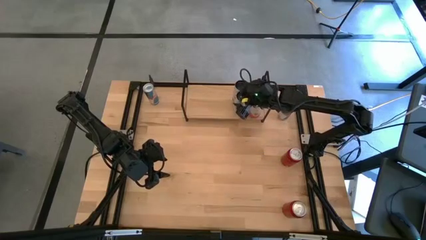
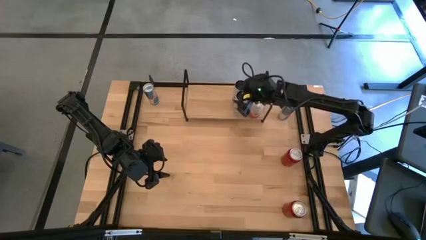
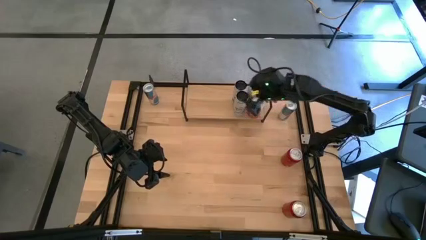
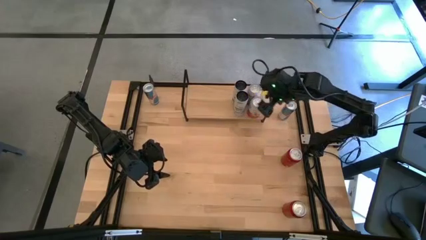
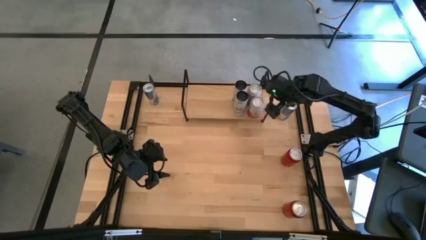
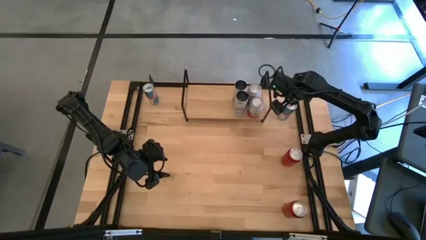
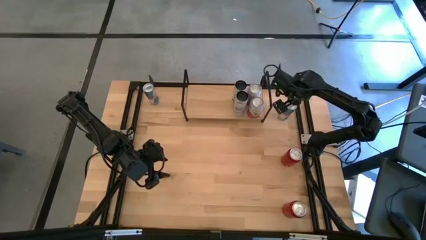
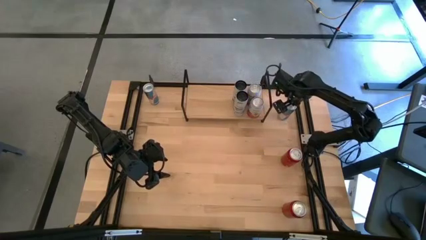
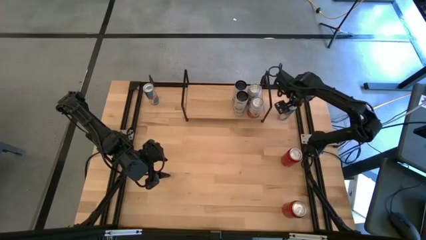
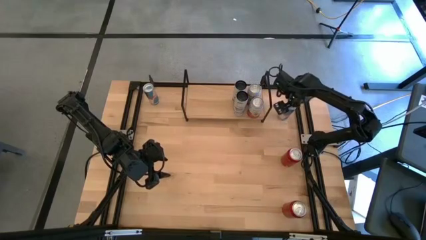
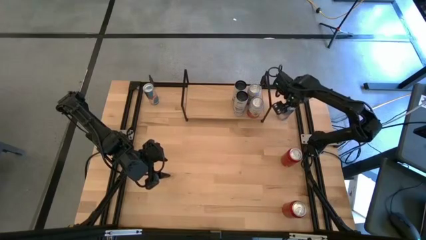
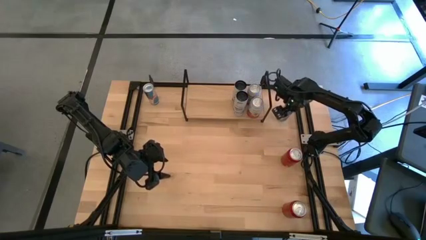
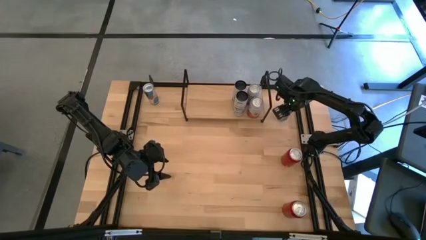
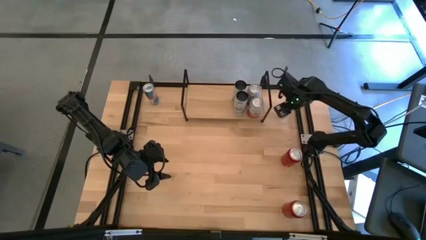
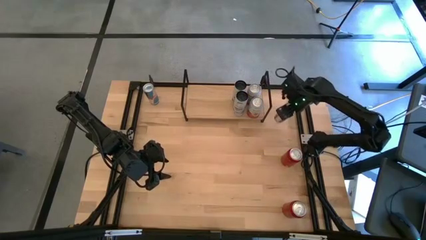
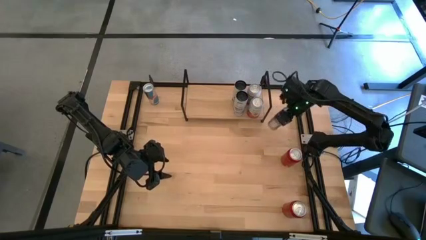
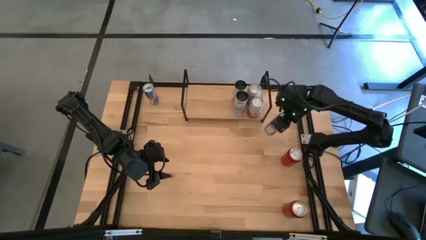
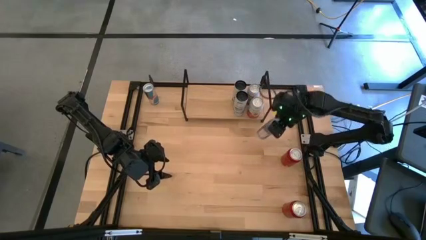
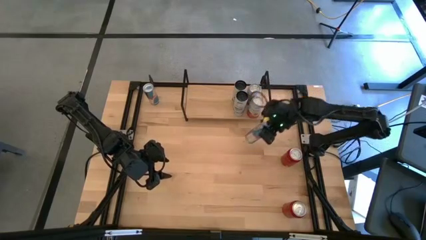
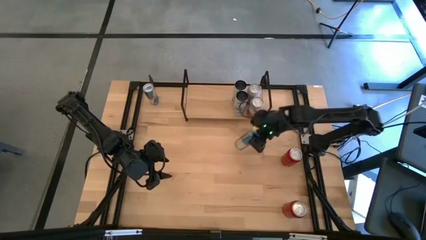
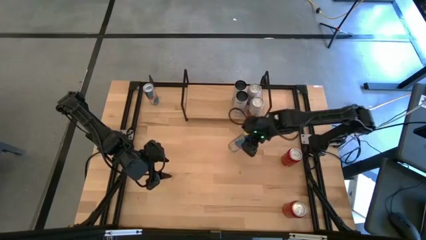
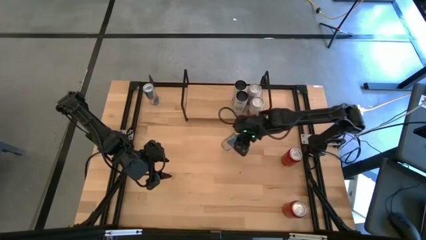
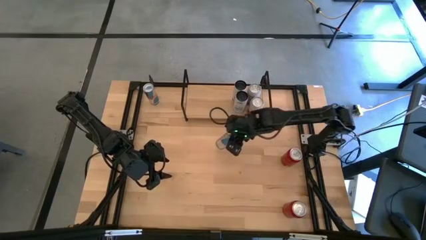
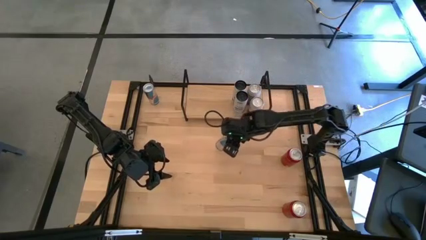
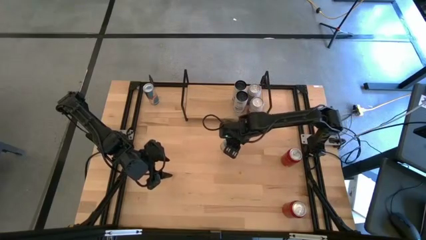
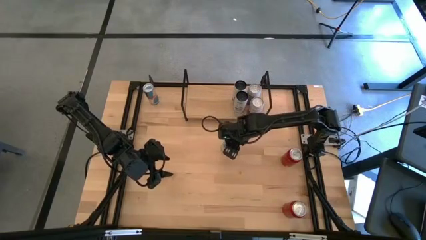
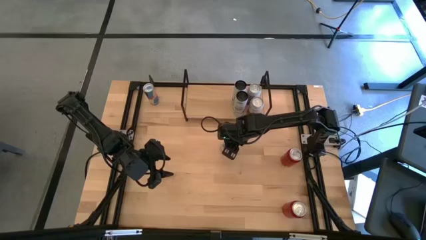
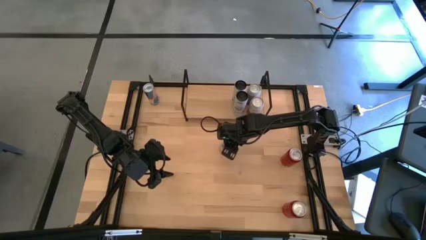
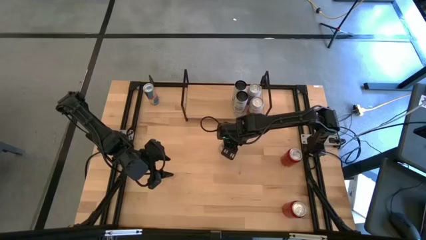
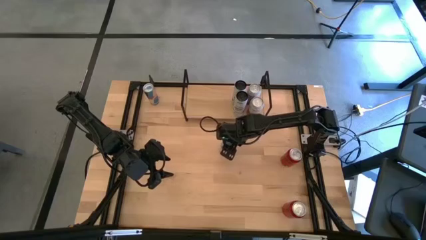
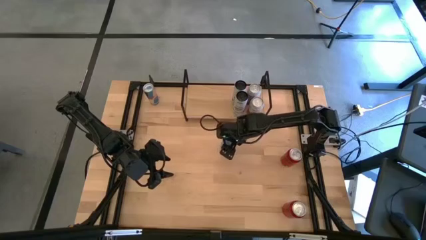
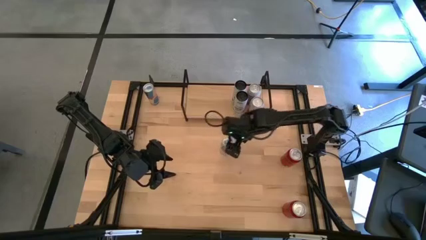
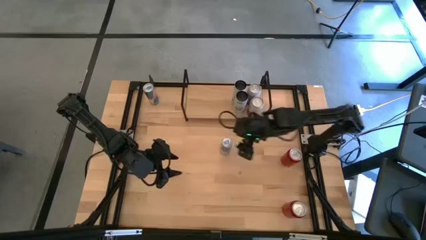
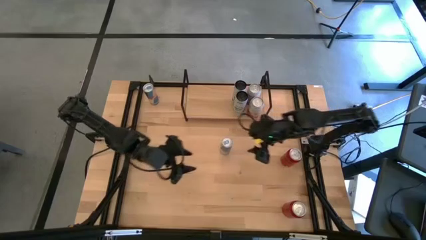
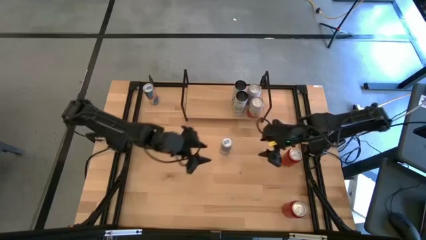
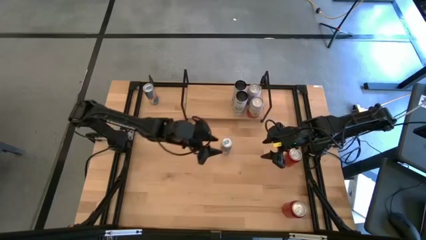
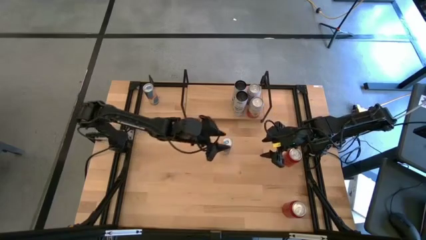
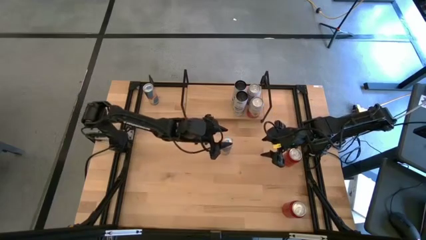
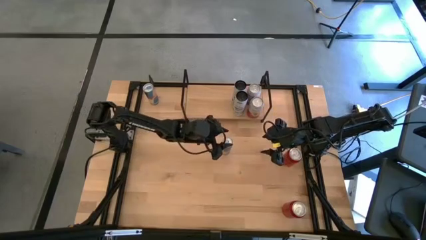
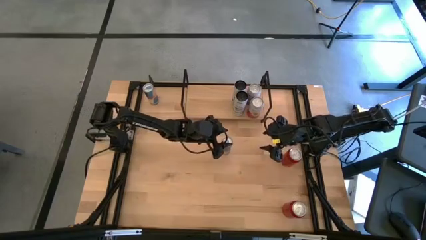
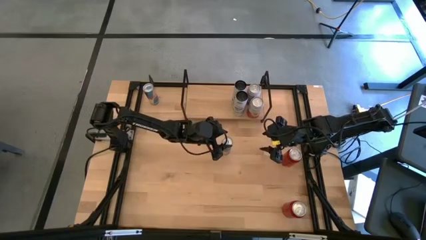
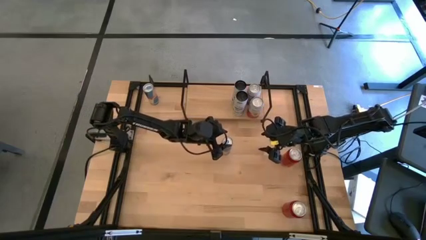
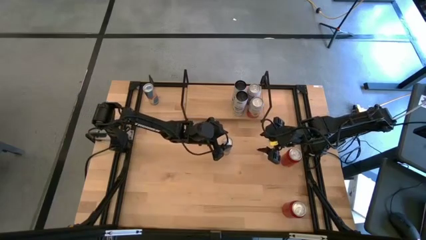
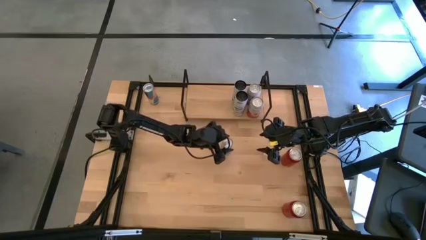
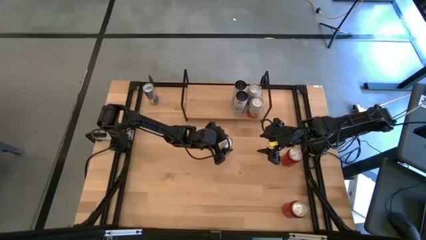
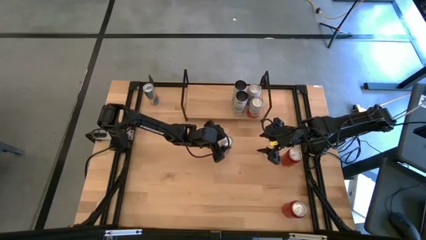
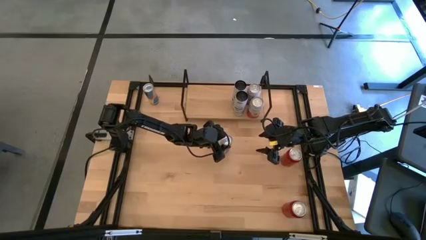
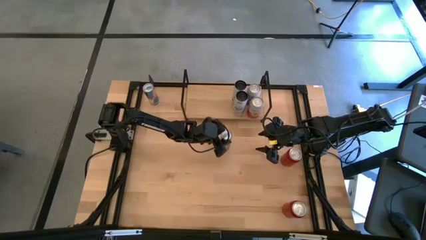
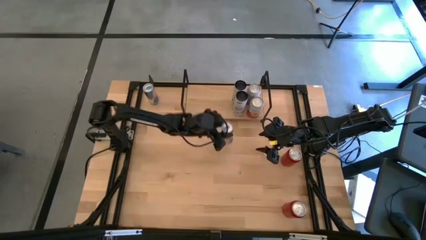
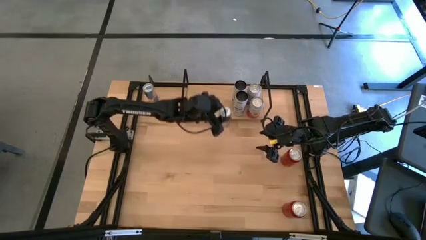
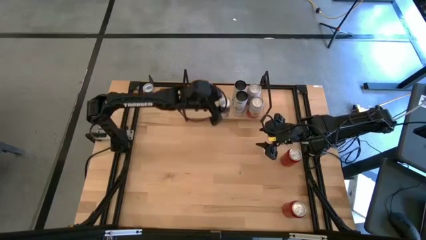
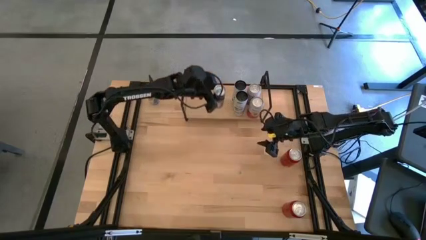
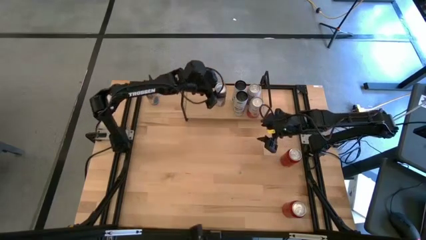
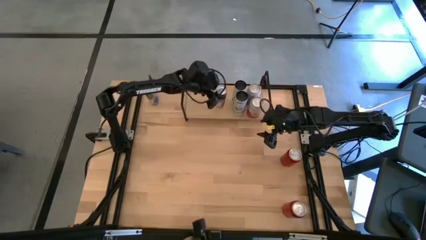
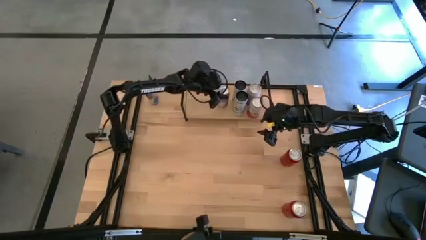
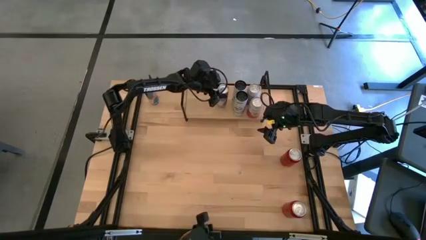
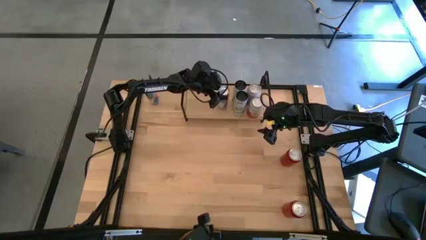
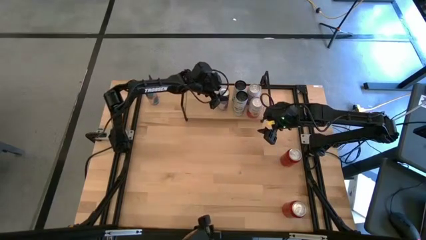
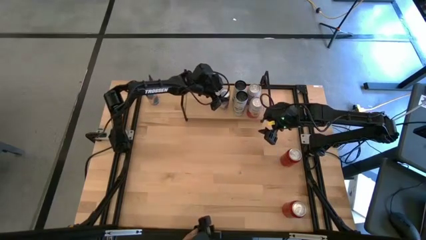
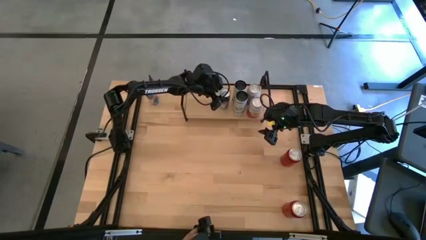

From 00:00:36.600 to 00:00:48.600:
Task: Place canned beverage on shelf
Put the right blue soda can on the shelf

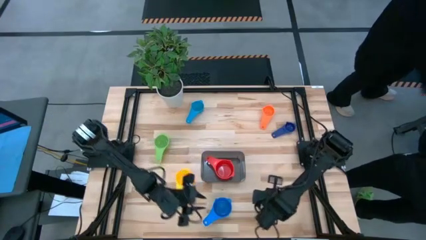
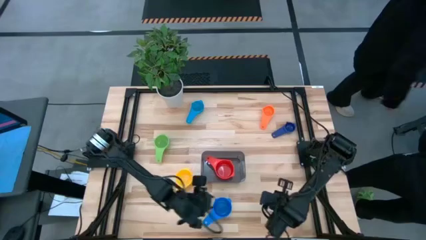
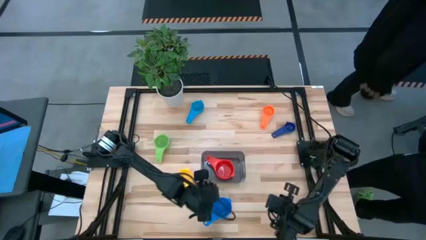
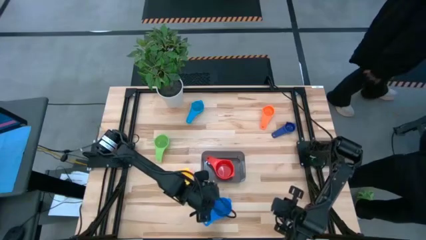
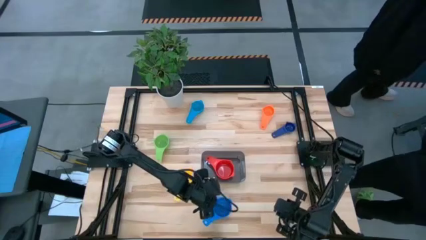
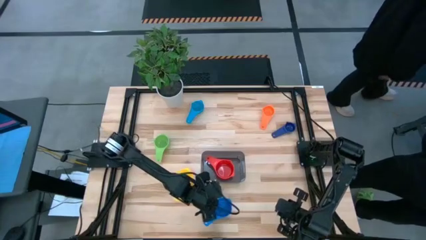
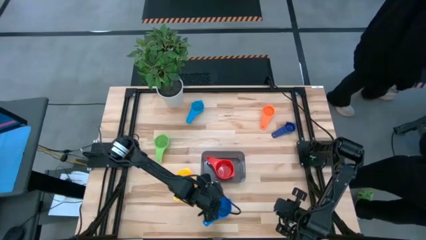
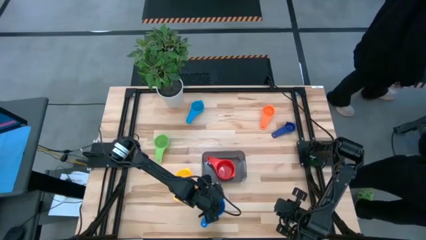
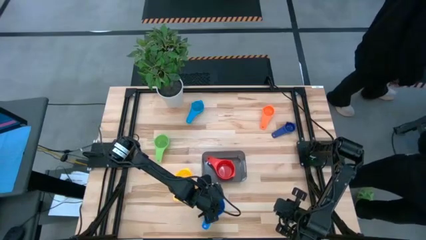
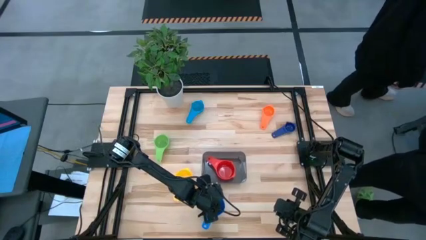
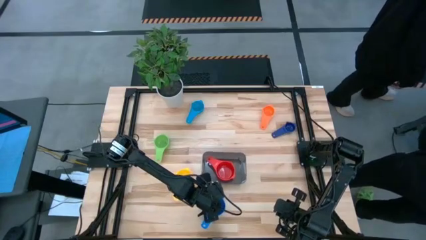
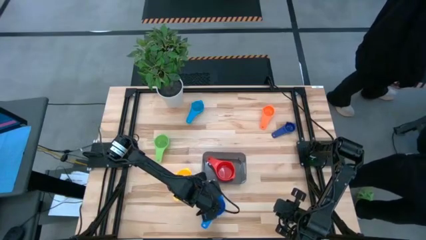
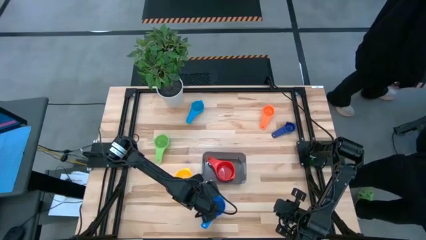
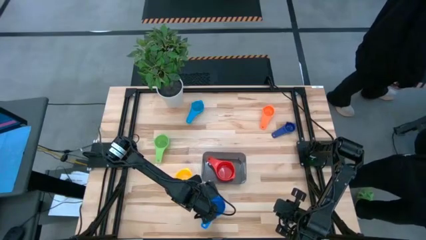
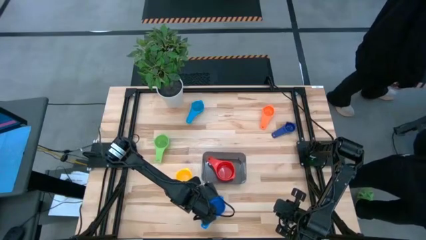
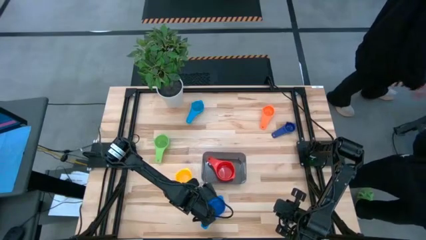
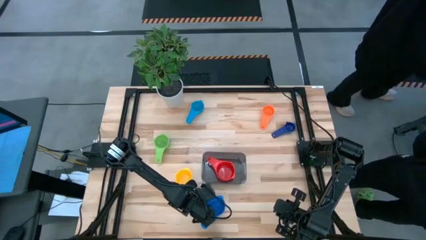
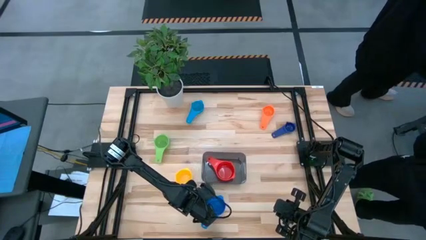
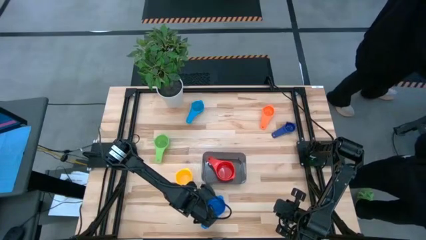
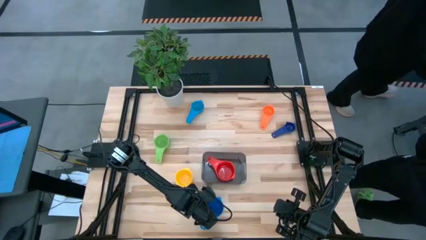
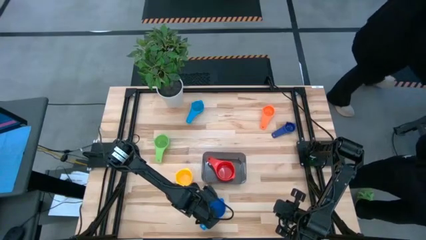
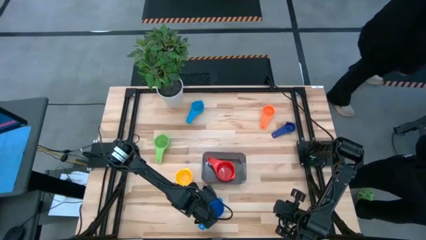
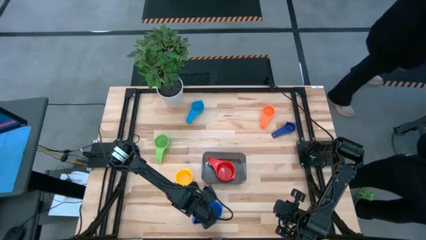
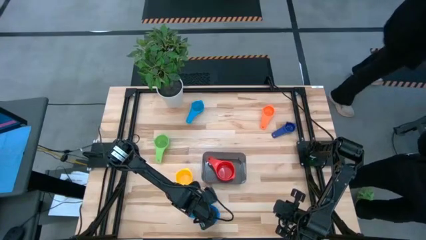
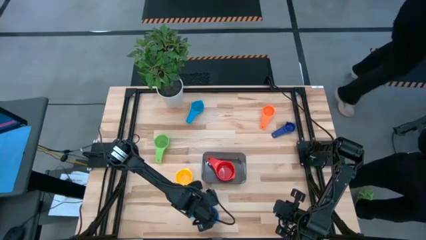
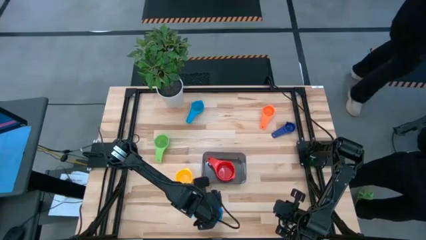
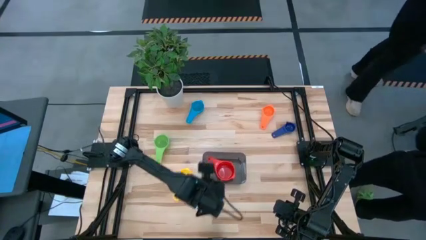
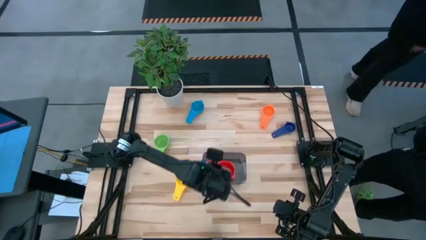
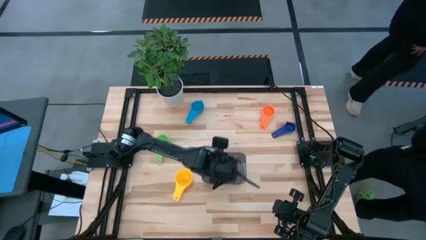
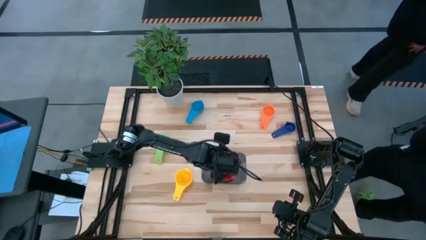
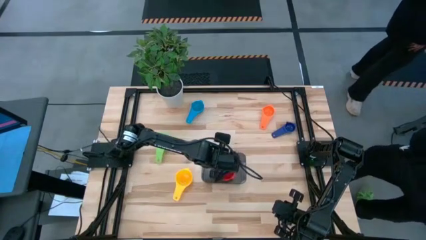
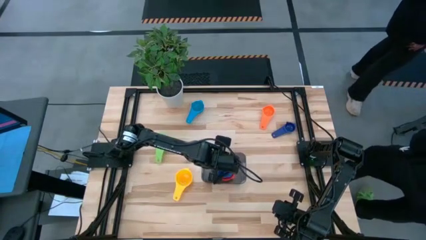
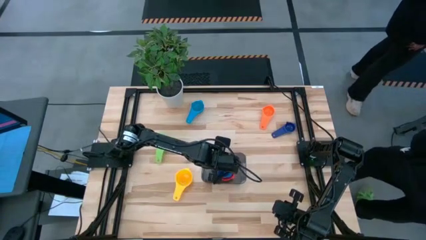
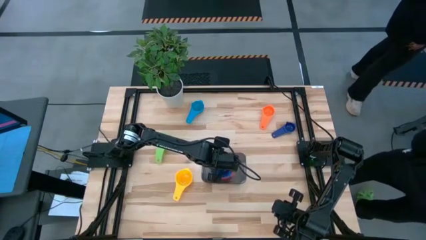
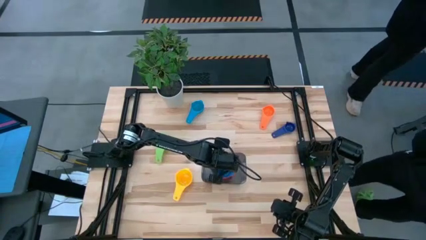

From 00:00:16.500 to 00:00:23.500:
Task: Nest measuring cups in basket
Stack the blue measuring cup on top of the red measuring cup into the black bin
